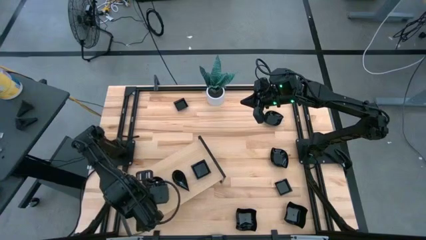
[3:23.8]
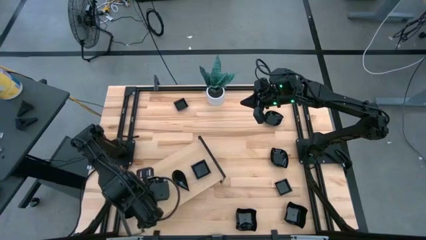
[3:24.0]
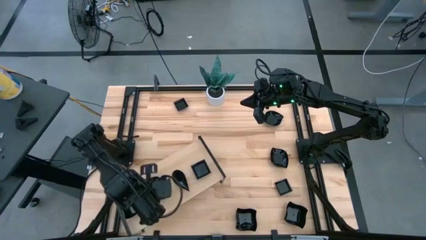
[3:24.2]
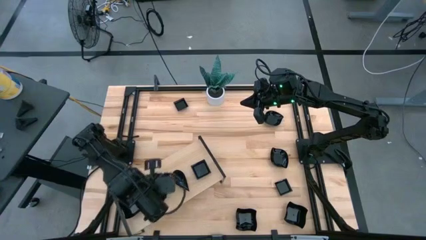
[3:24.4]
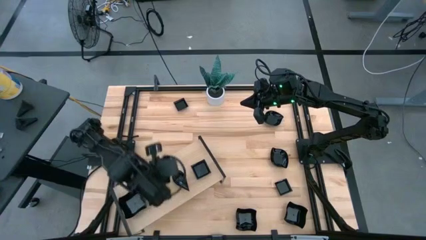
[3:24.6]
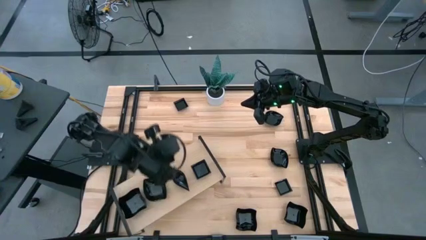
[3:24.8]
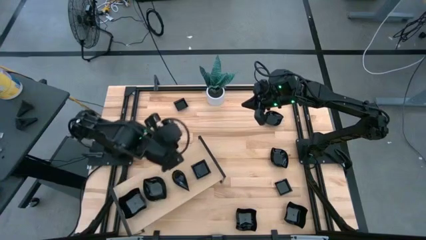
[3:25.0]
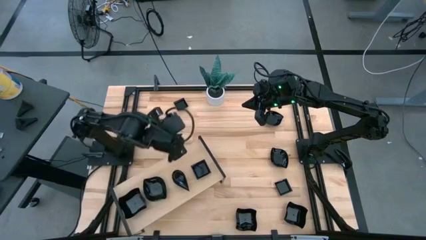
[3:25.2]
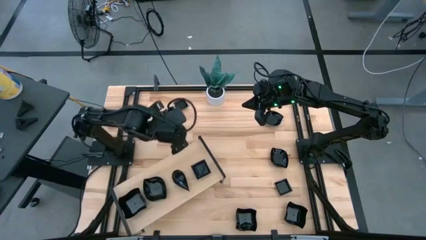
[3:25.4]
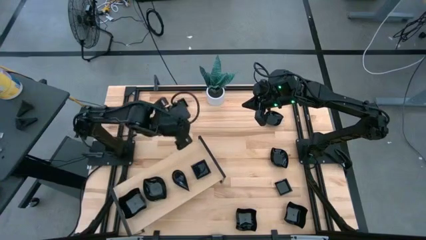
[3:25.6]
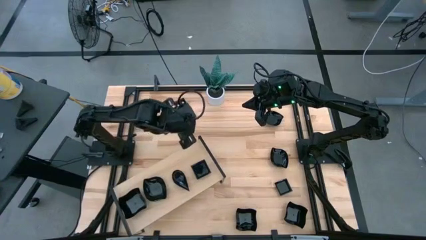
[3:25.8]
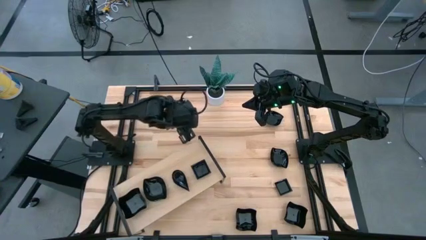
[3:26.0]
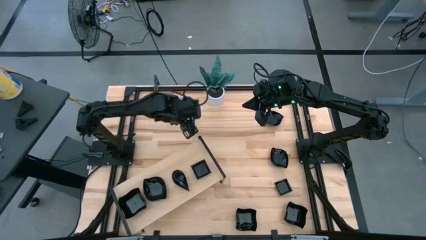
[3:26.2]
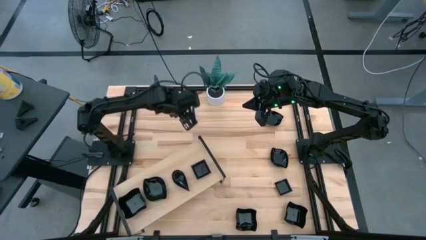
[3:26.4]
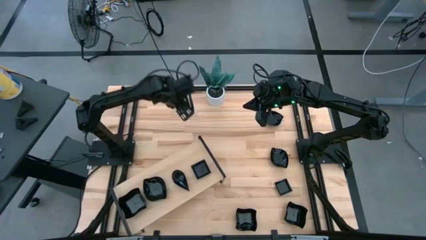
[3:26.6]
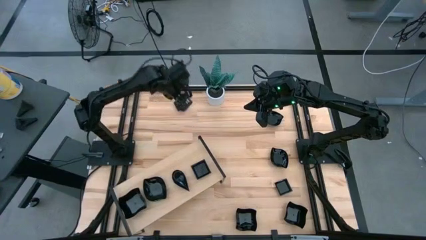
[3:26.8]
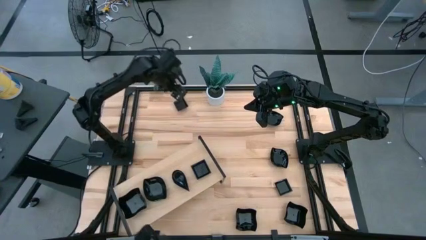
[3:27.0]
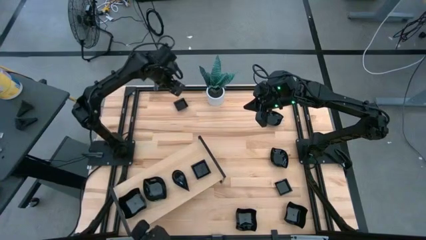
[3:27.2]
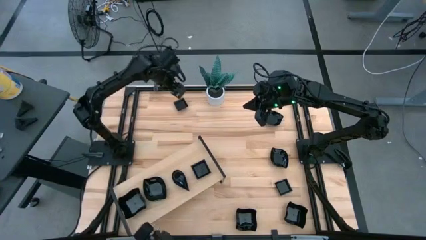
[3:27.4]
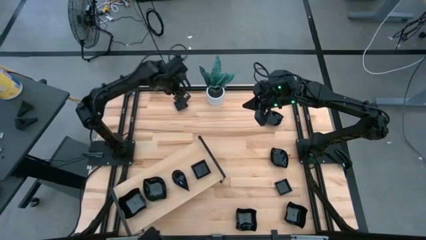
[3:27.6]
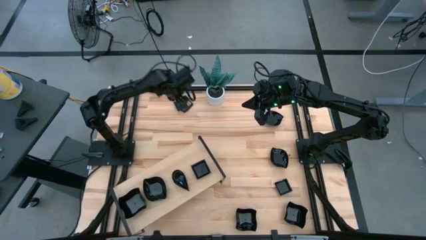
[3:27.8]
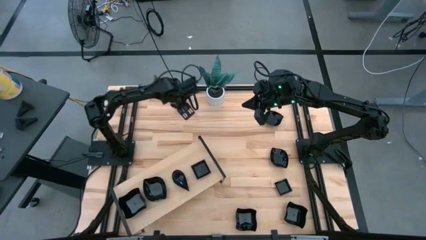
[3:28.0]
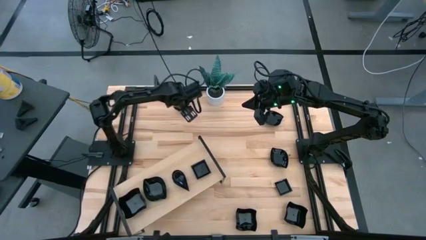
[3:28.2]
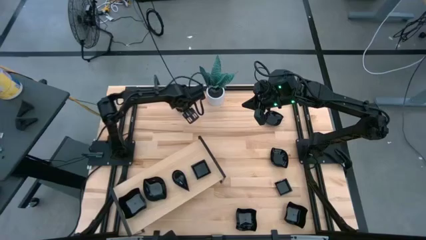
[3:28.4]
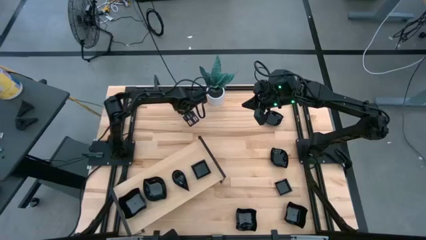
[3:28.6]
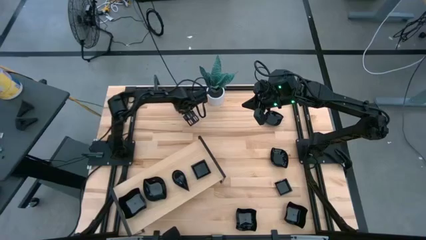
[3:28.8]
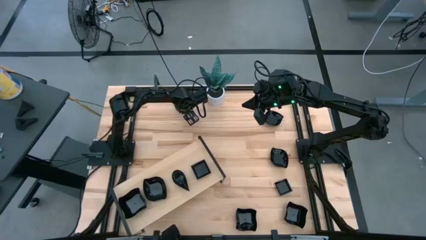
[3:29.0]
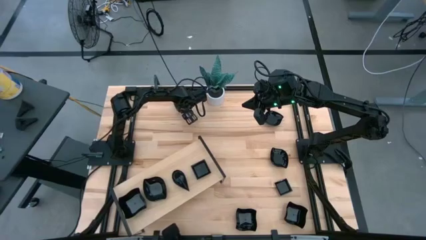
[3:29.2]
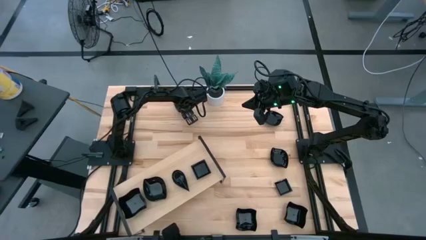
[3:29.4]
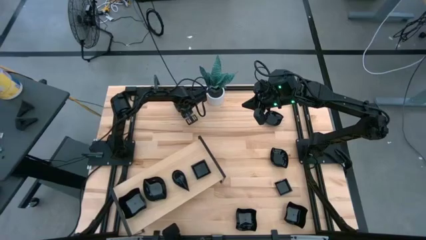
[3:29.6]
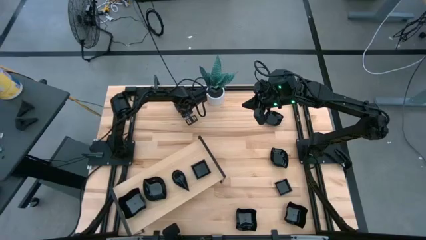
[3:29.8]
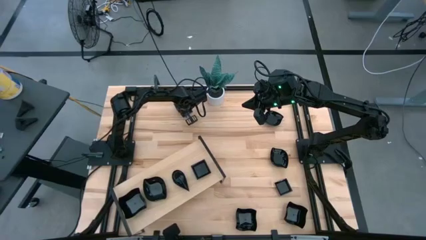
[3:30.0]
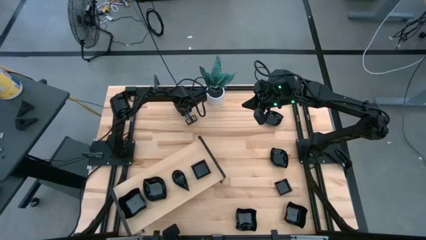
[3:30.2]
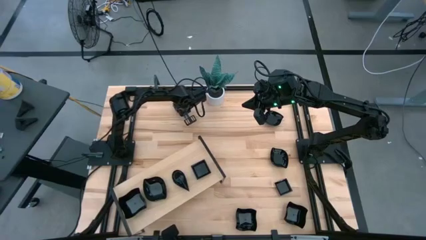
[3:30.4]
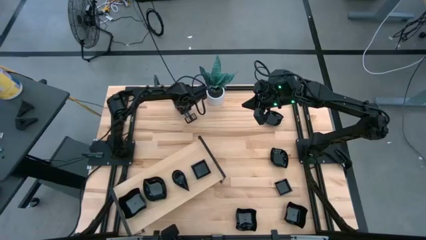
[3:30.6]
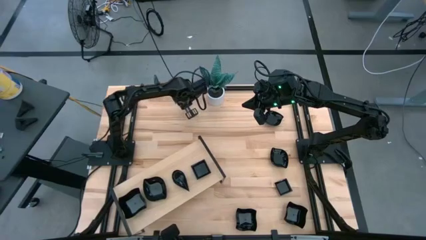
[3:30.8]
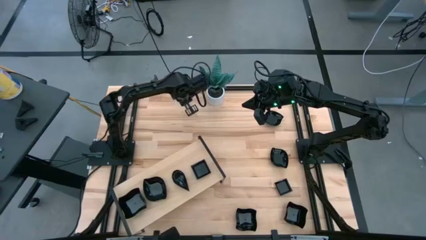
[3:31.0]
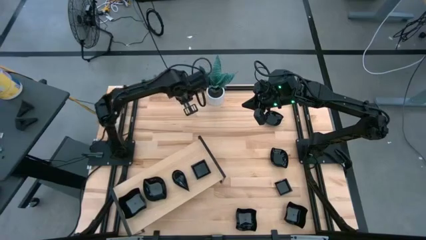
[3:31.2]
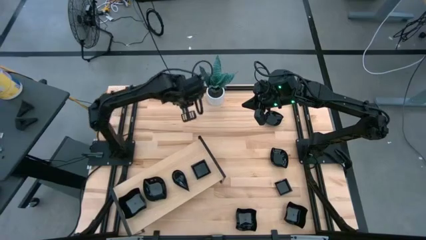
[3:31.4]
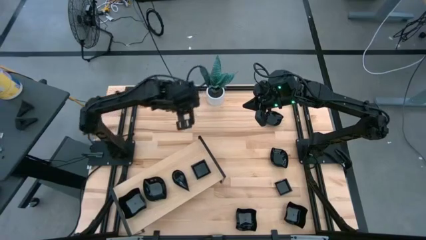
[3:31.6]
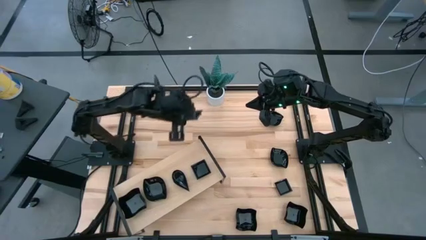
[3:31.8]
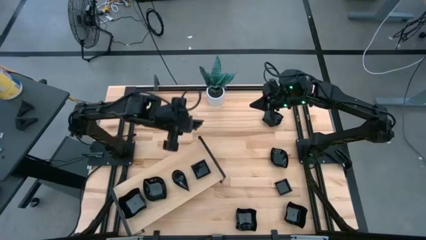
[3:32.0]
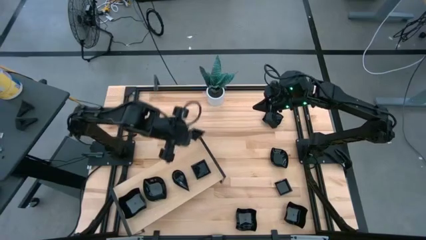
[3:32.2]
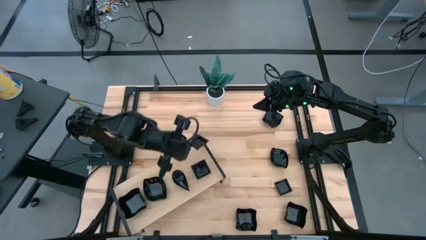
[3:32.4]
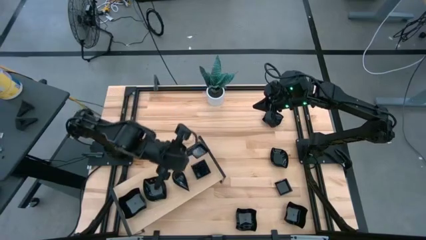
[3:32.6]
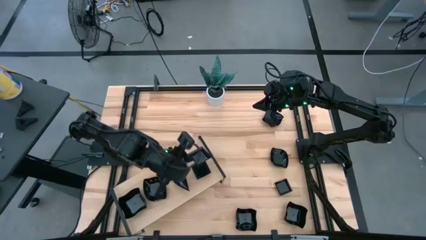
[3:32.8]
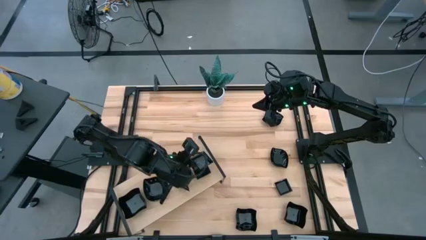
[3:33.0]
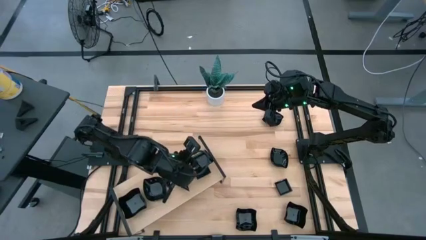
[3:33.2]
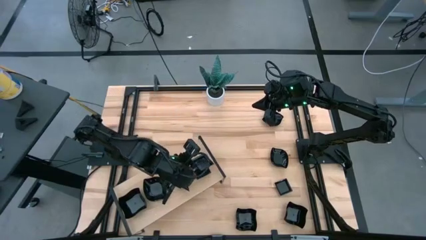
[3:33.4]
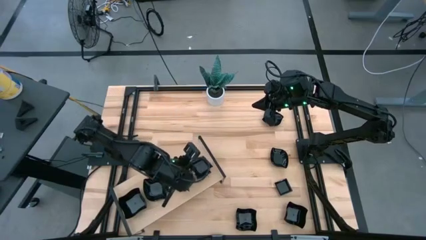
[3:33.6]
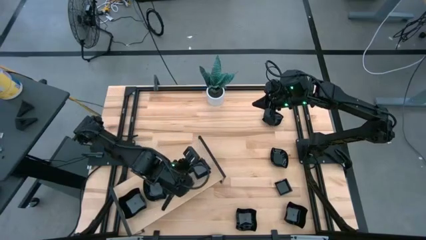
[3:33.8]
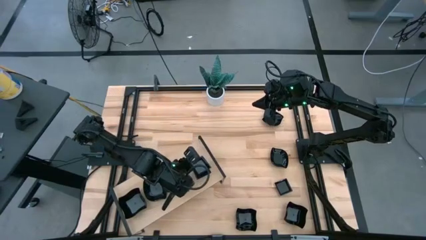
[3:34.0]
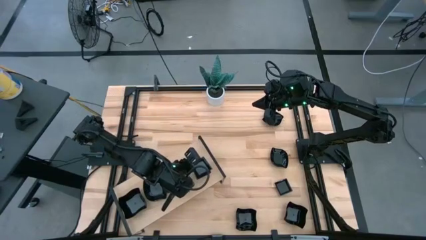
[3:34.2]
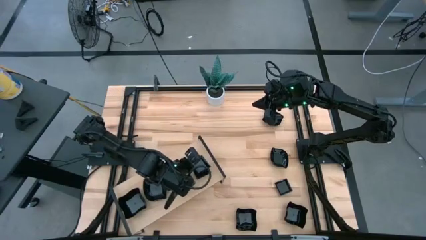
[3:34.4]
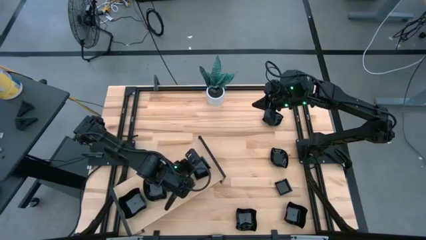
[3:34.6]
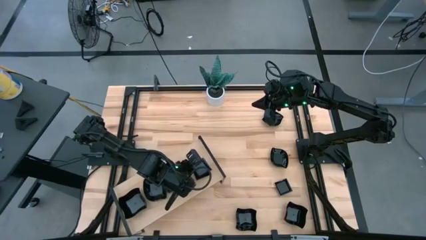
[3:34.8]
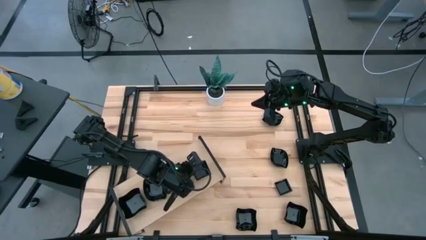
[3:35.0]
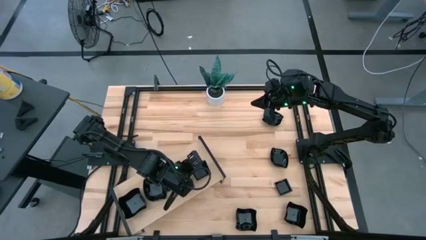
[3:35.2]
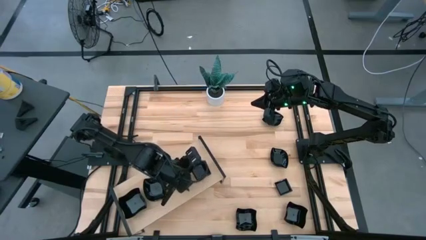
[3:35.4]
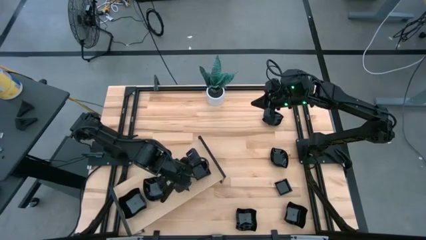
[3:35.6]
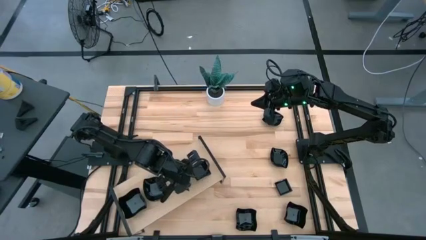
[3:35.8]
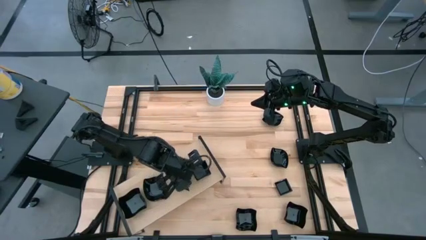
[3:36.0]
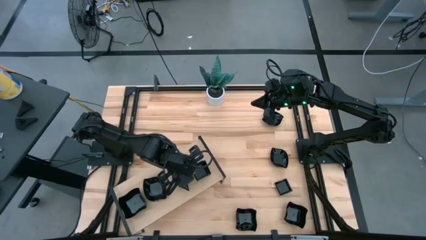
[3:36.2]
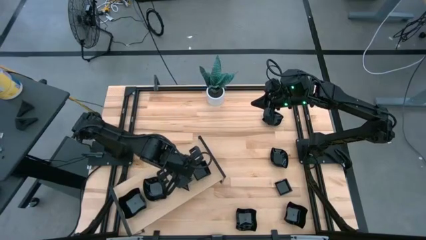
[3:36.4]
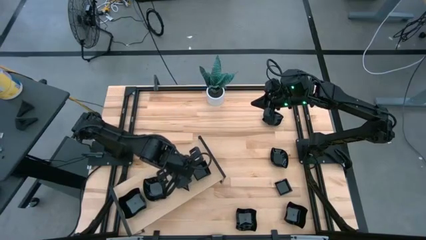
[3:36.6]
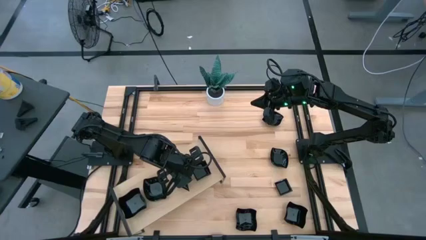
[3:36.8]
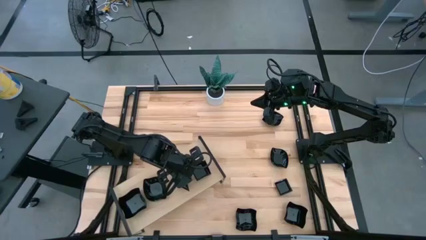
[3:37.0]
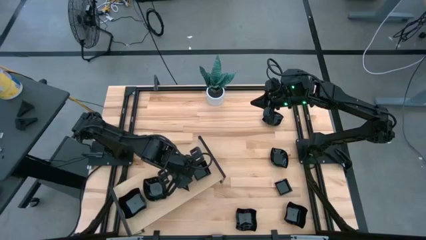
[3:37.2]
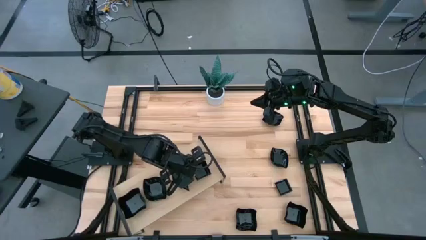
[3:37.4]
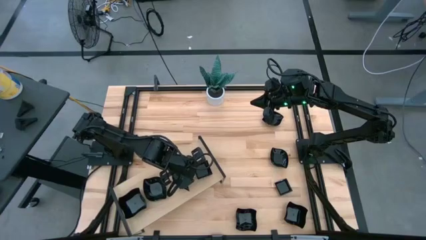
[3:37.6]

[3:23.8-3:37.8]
Task: Pick & Place Mini shaped plates
Stack the black square plate on top of the black square plate on the shelf

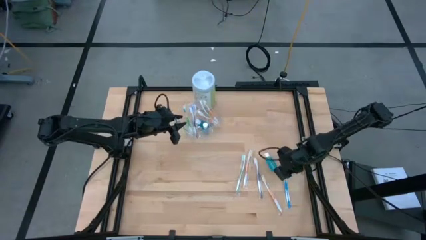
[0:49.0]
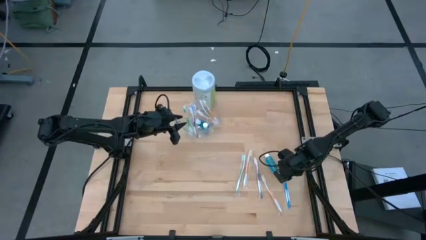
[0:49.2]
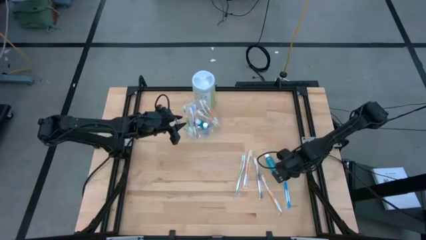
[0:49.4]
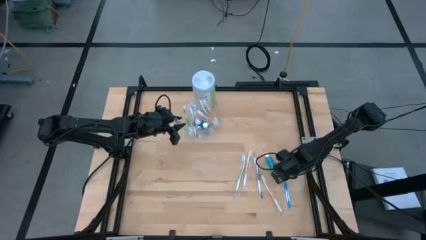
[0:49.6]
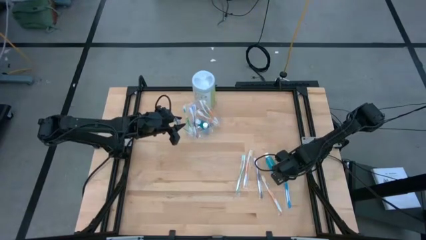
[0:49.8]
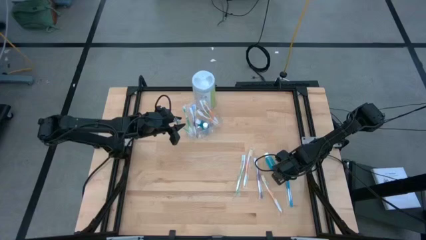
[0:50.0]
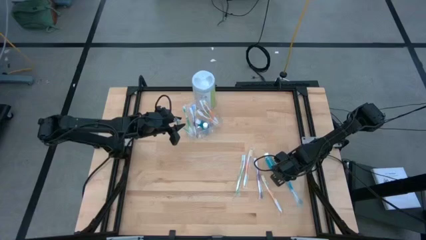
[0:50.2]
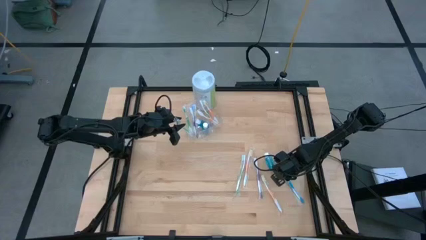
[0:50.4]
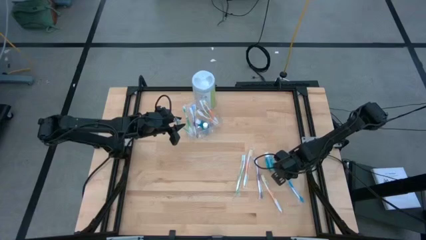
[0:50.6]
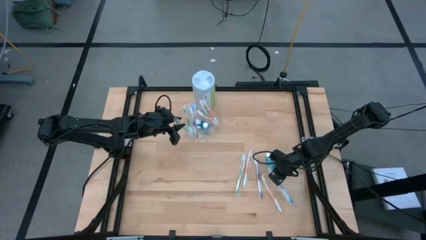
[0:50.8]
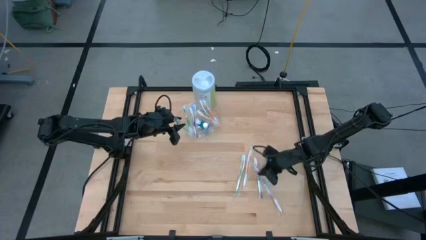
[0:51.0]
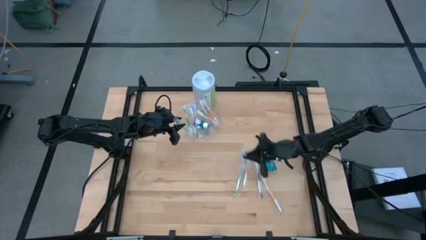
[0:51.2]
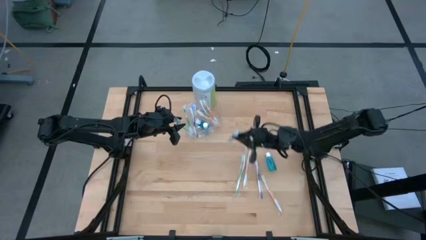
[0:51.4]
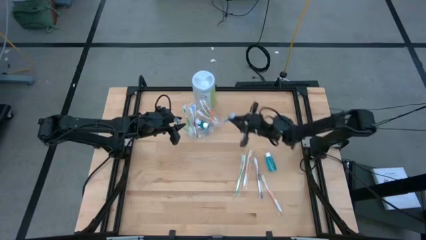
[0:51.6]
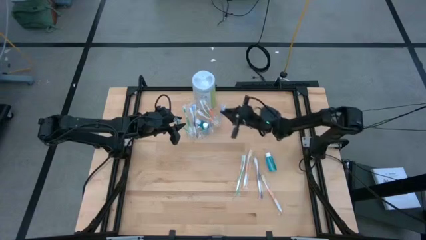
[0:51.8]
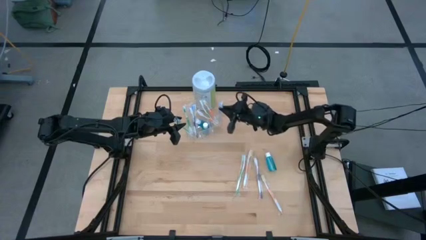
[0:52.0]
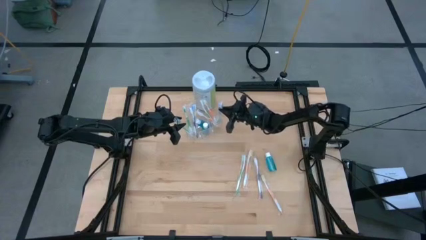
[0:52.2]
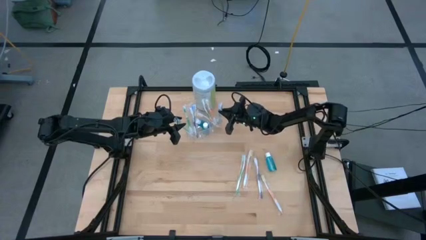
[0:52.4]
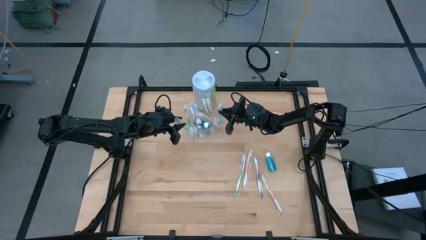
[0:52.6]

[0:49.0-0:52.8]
Task: Pick & Place toothbrushing station
Put the blue toothbrush into the transparent organizer
